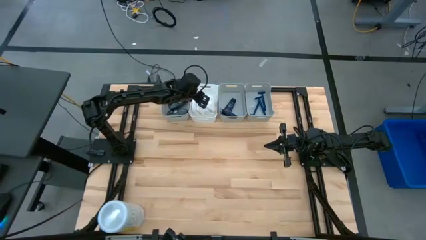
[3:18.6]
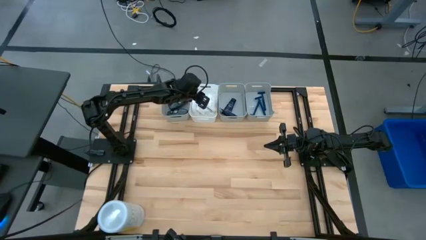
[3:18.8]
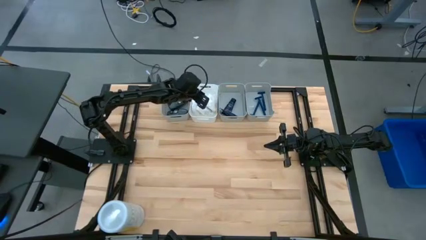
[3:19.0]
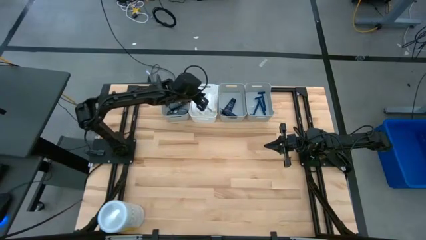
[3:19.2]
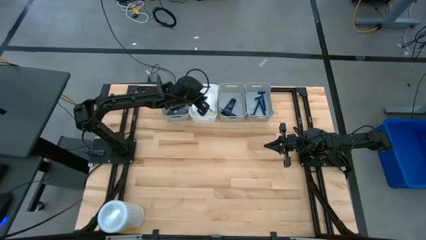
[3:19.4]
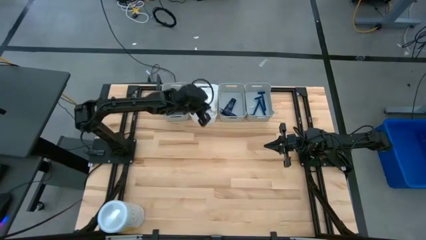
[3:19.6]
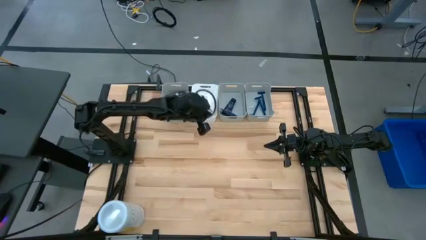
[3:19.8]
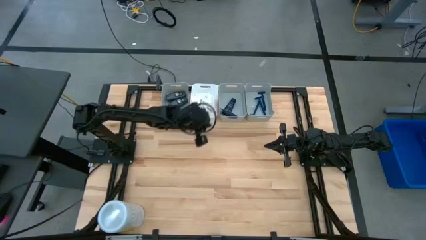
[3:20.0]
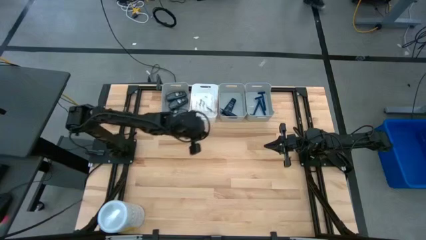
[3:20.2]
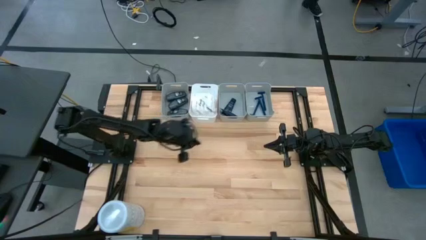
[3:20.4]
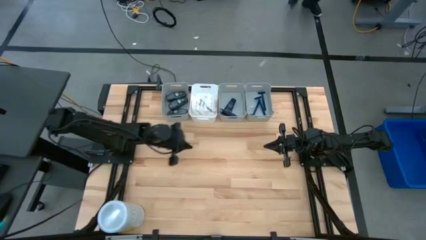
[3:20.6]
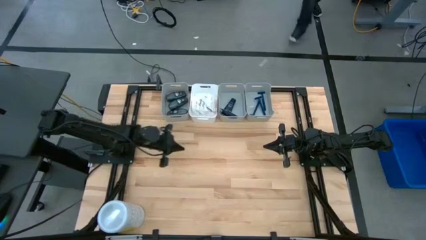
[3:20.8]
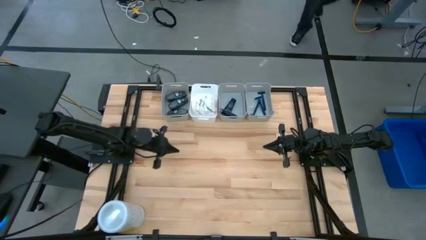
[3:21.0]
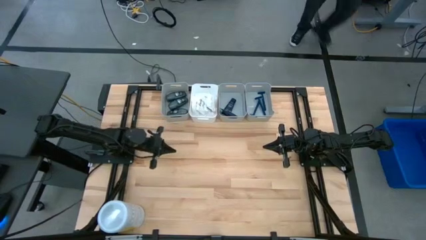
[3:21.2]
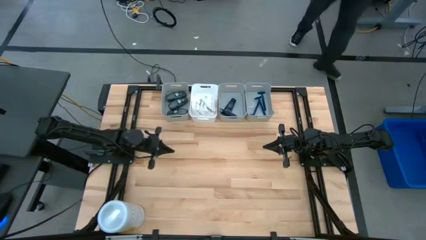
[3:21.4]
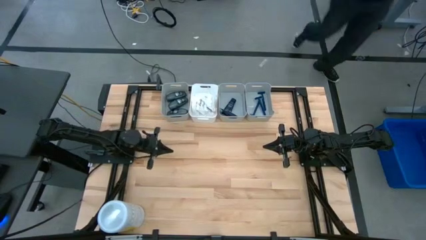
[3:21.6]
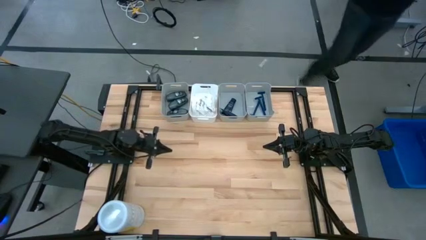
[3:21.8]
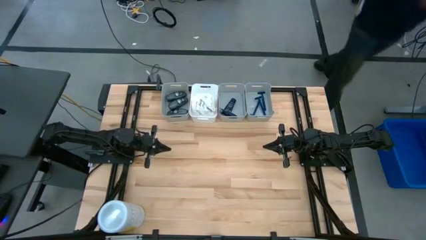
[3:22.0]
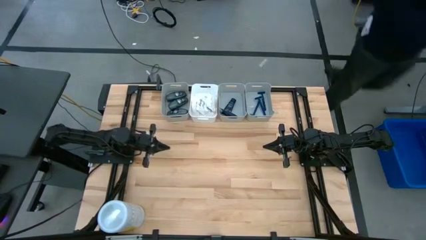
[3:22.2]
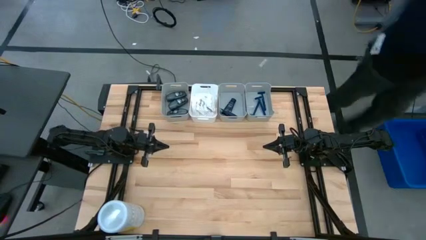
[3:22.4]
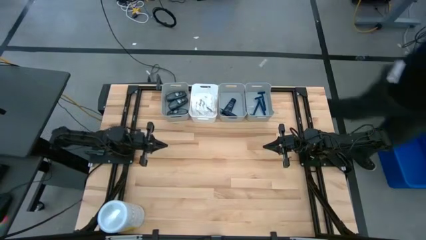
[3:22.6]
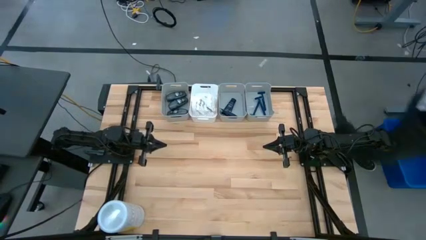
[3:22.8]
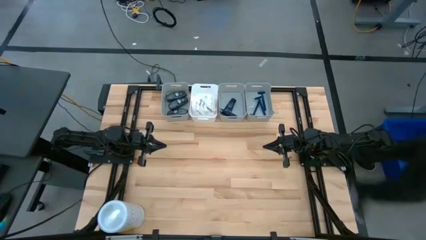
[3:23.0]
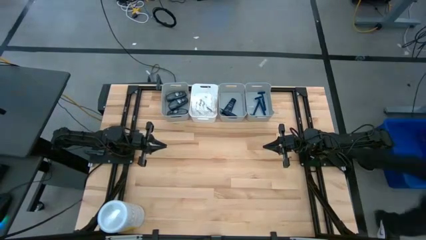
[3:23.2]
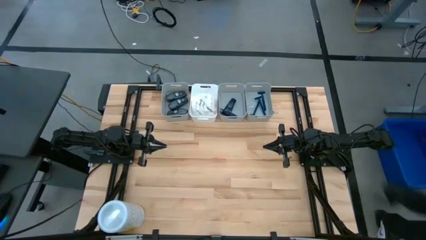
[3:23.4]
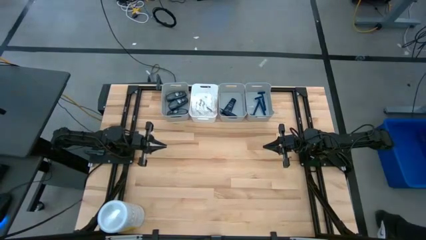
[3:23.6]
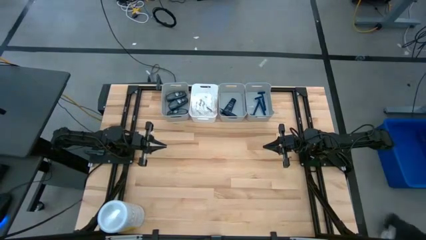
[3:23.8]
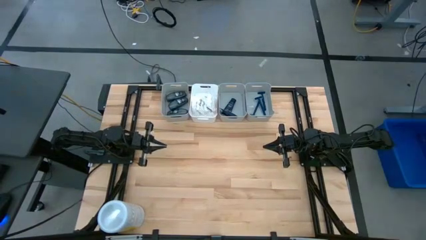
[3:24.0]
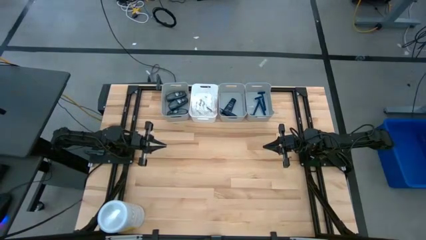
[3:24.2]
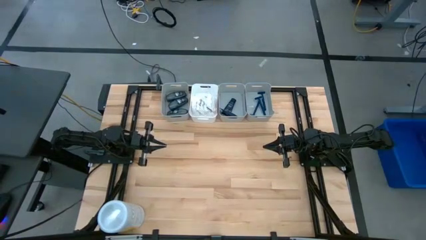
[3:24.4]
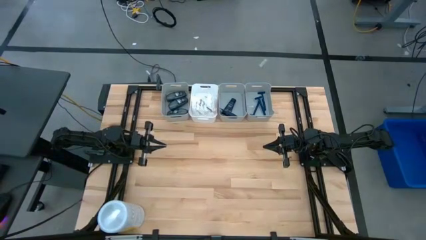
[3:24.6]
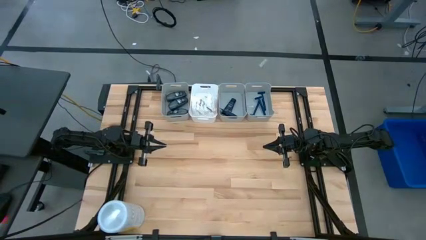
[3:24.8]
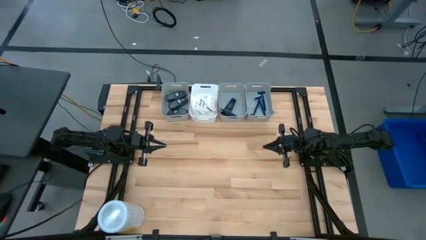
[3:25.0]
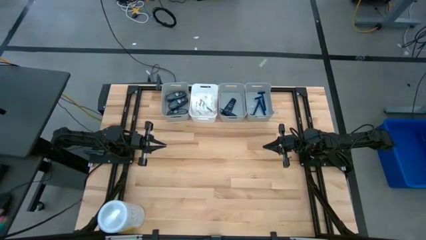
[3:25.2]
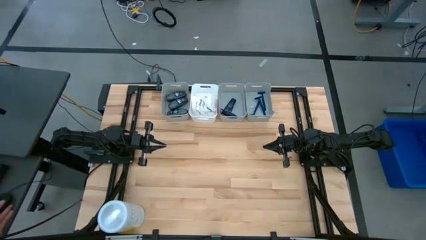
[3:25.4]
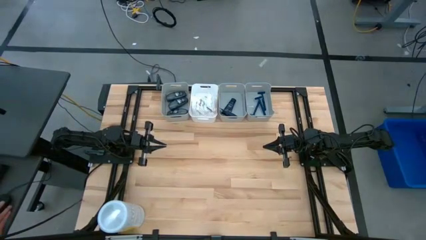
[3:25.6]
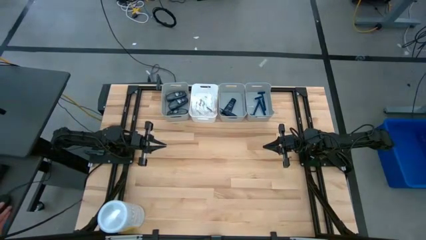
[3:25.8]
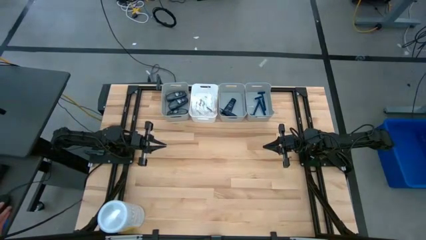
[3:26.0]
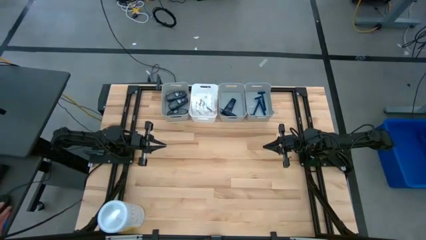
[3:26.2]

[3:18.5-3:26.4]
Task: Pick & Place Travel size toiletries
Return to Home Position

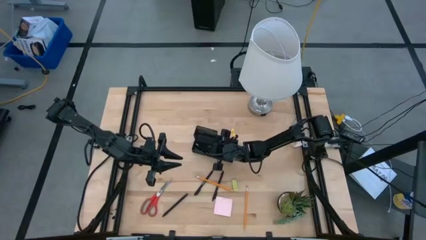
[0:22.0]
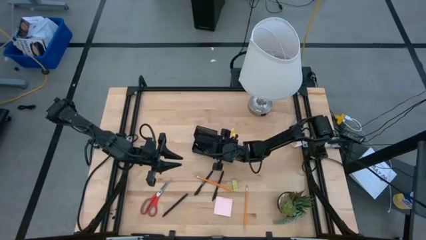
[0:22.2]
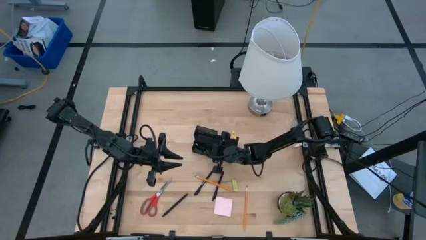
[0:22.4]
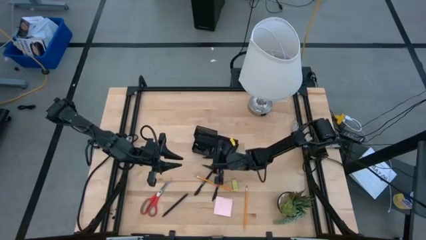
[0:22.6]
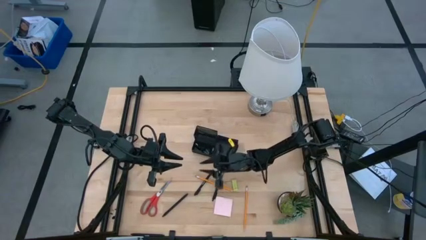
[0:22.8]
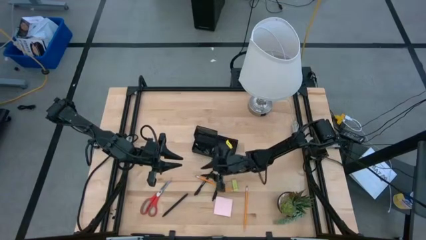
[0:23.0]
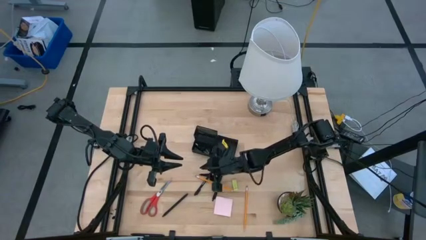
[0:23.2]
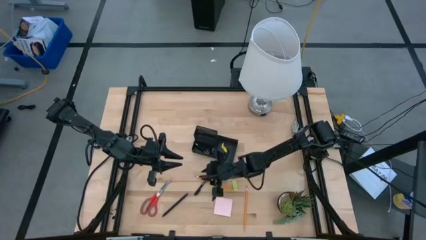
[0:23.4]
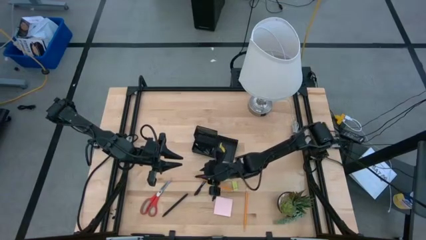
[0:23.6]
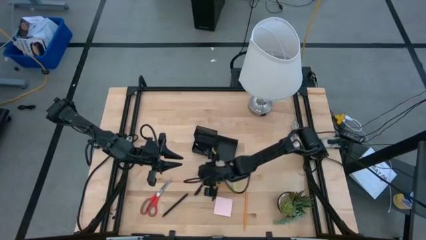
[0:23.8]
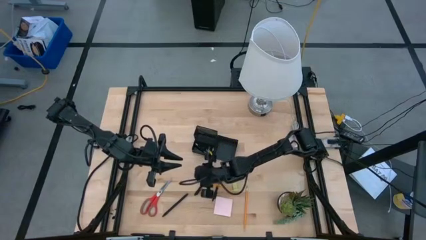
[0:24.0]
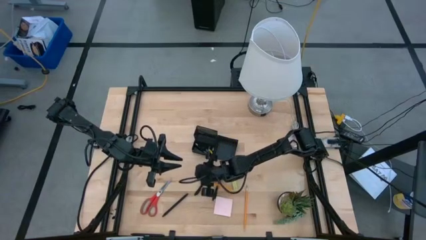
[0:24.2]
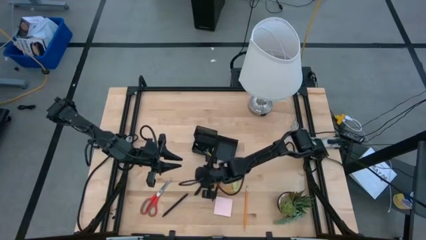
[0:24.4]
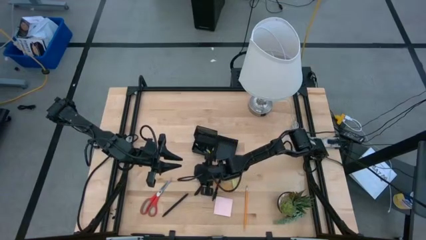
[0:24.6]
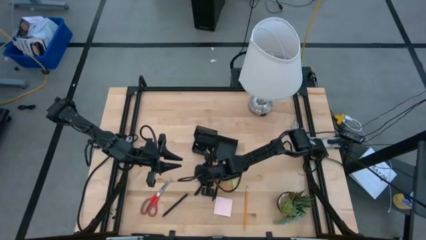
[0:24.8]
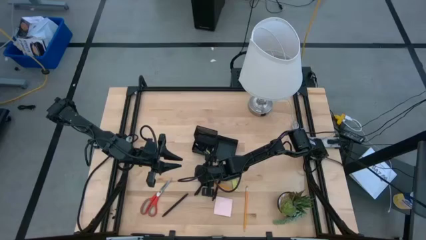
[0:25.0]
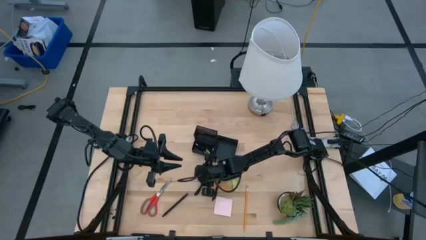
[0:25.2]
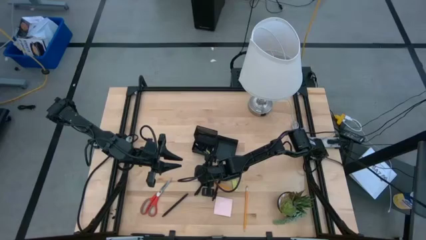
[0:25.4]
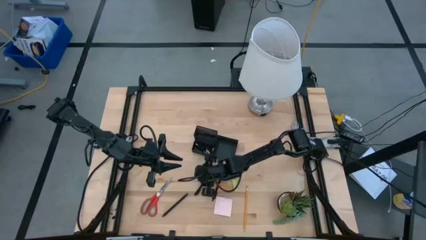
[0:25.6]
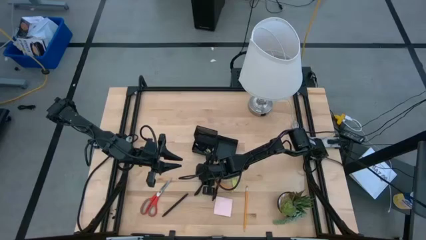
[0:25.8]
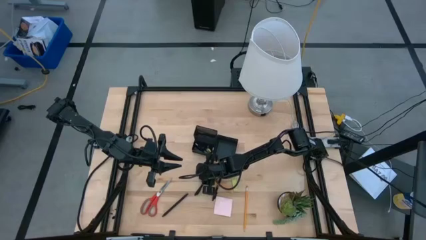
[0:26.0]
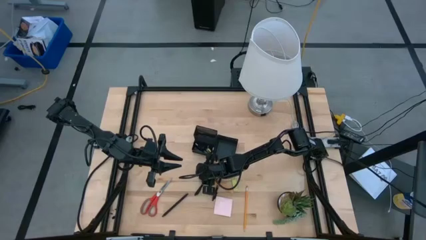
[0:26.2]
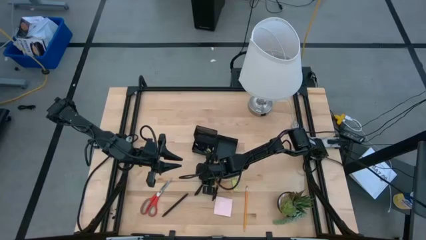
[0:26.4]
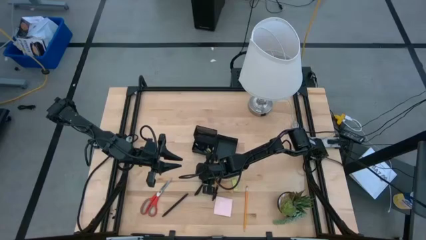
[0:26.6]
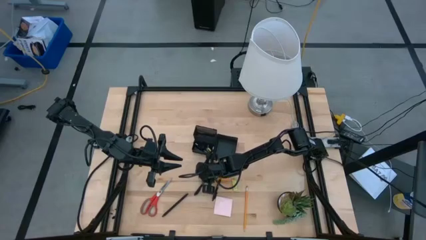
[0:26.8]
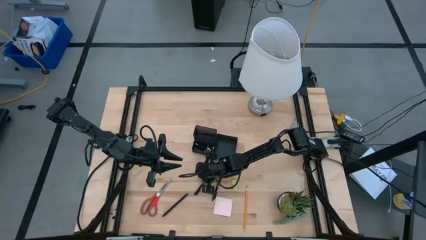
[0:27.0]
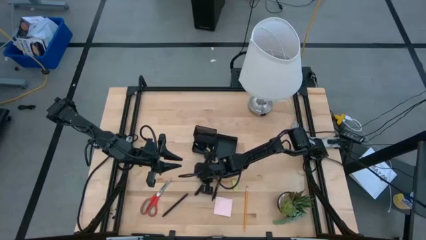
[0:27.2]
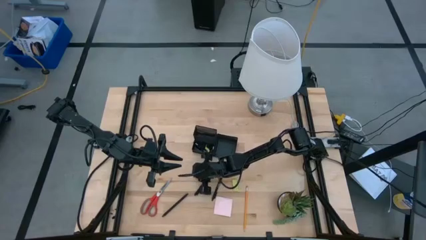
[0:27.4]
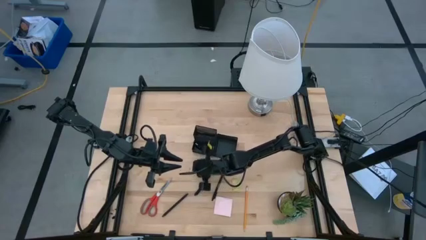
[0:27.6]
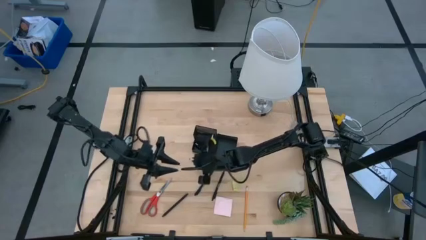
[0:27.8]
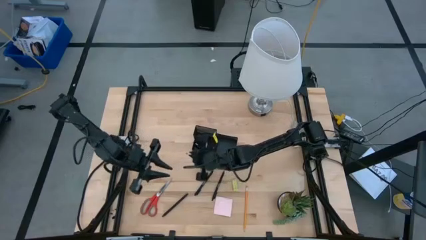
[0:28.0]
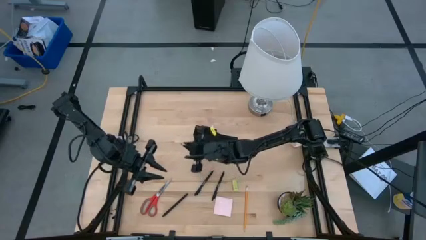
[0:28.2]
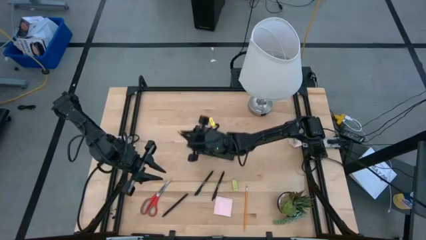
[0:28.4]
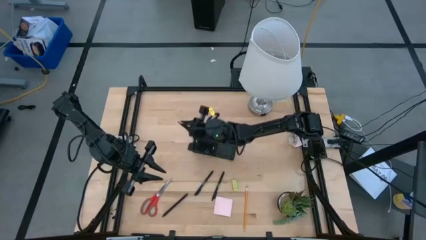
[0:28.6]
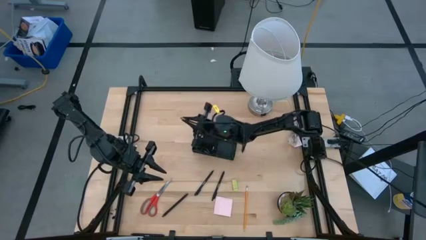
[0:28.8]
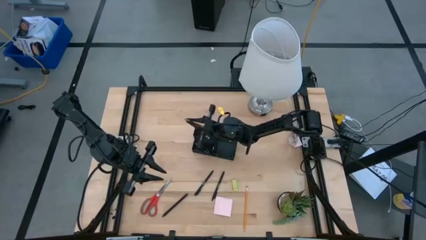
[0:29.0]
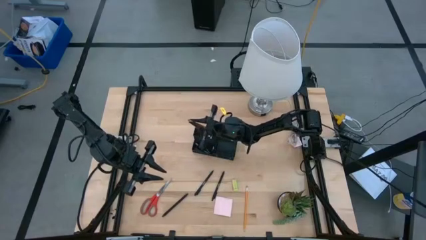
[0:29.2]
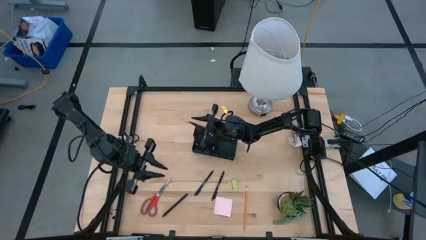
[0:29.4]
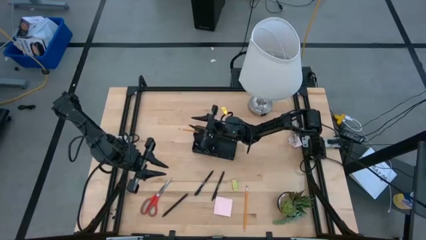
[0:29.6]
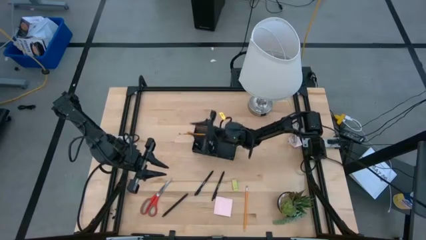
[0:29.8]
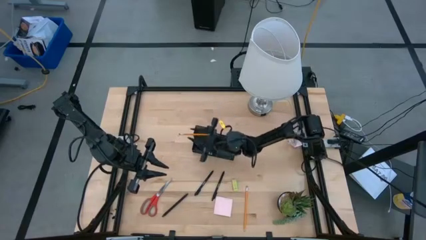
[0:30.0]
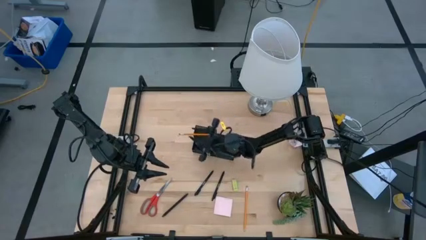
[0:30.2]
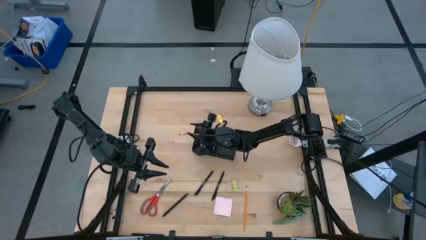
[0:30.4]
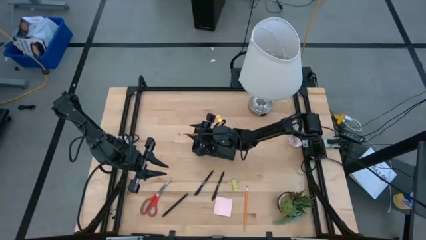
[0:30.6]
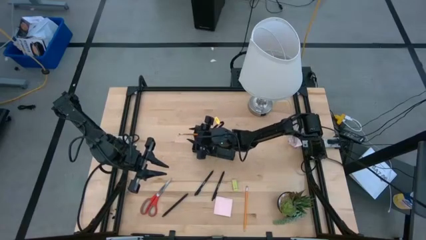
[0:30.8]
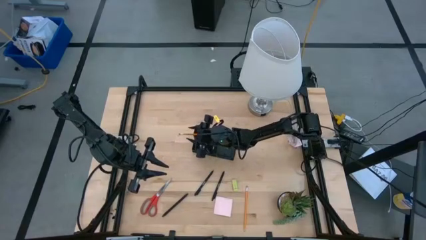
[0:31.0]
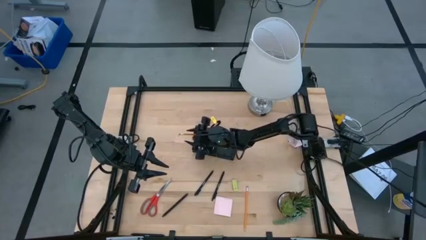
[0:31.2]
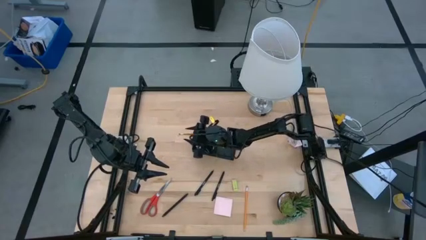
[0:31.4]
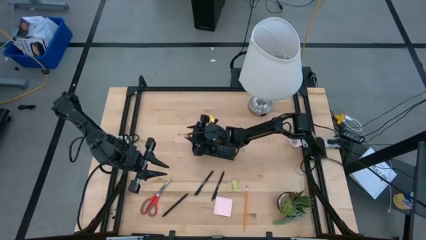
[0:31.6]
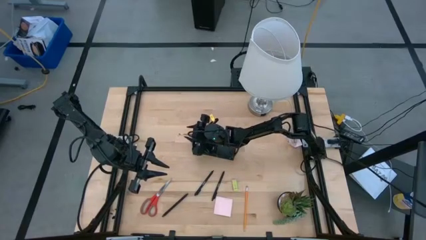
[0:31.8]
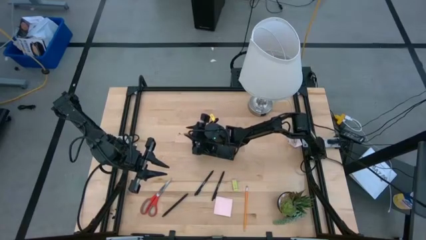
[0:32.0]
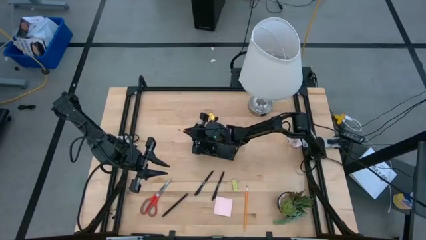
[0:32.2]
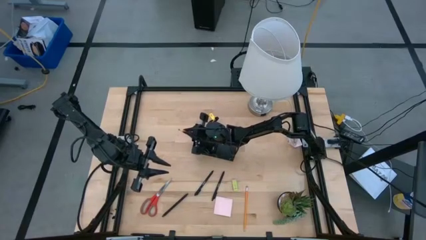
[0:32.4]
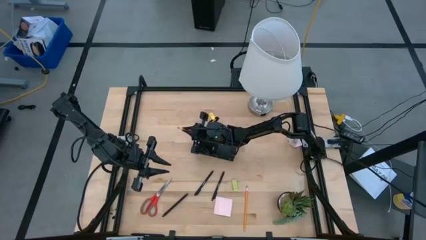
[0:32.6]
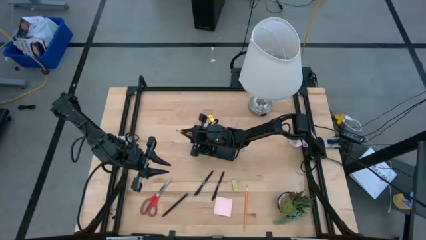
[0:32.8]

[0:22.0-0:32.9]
Task: Pick and place office supplies into organizer
Put the yellow pencil into the black desk organizer
